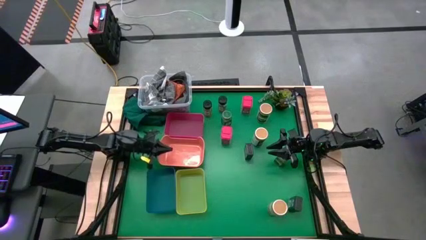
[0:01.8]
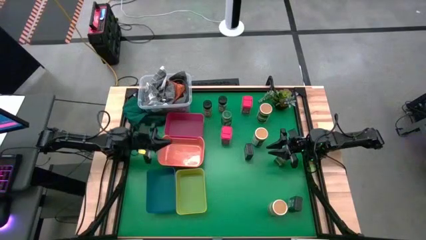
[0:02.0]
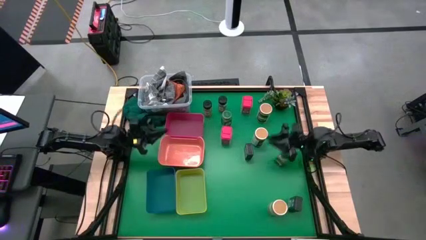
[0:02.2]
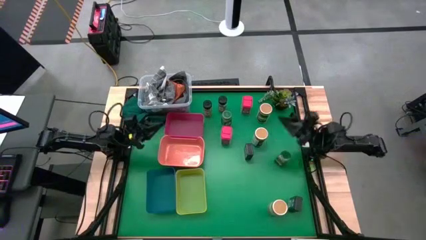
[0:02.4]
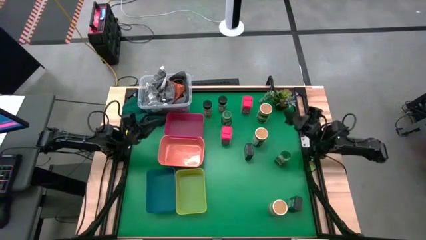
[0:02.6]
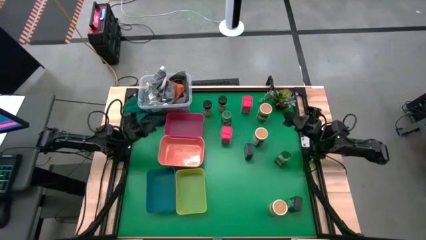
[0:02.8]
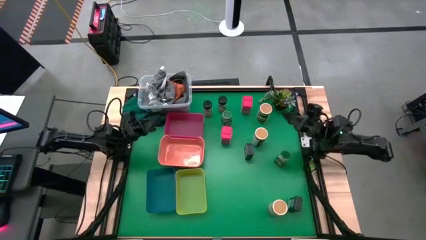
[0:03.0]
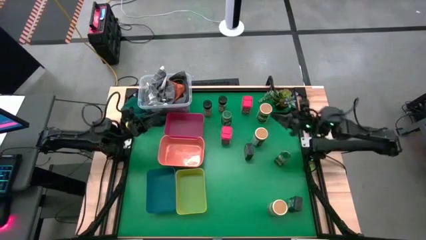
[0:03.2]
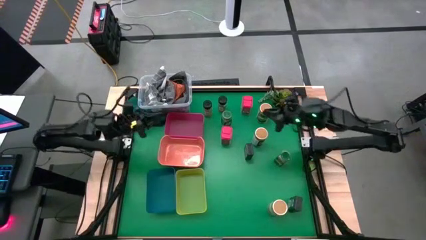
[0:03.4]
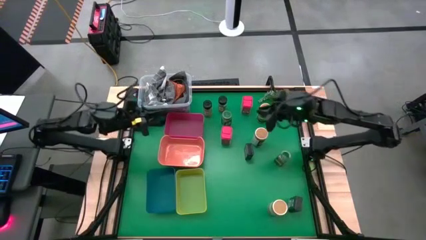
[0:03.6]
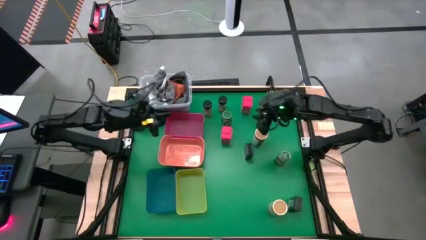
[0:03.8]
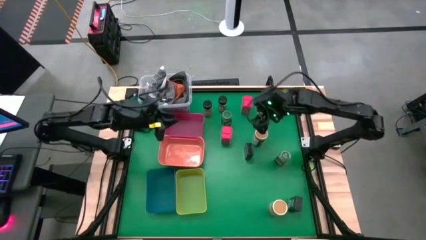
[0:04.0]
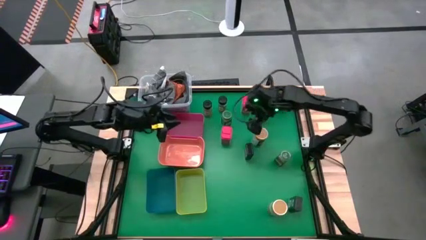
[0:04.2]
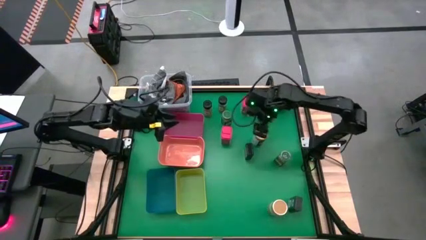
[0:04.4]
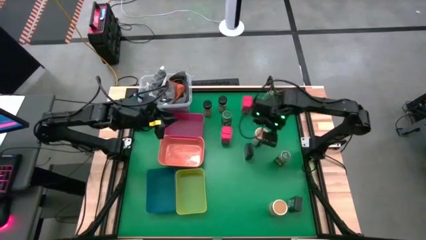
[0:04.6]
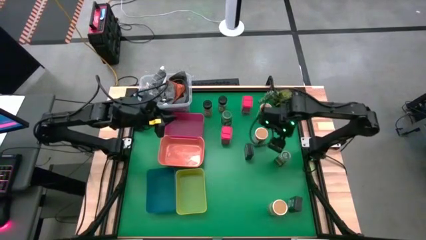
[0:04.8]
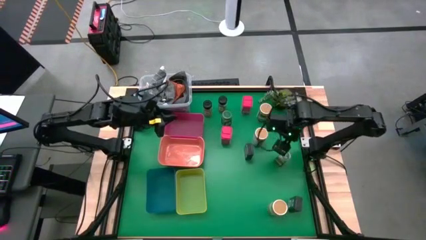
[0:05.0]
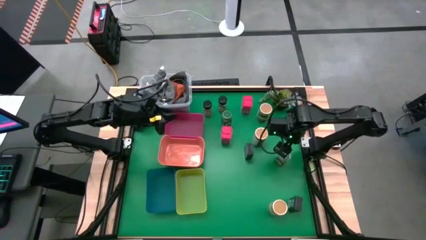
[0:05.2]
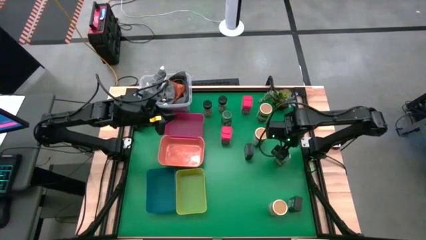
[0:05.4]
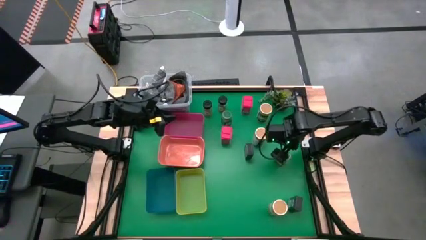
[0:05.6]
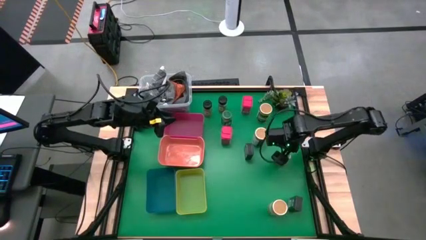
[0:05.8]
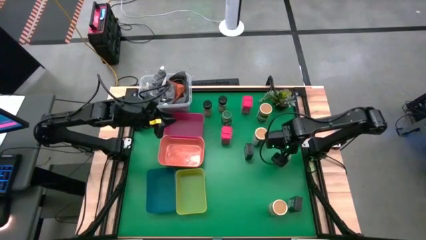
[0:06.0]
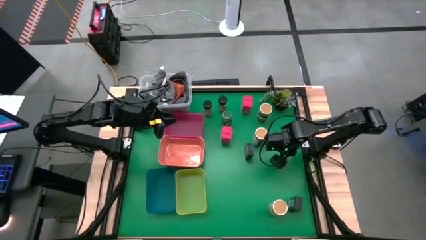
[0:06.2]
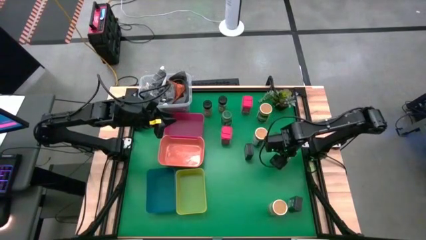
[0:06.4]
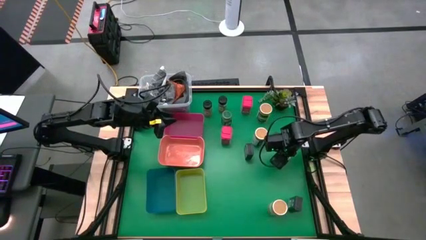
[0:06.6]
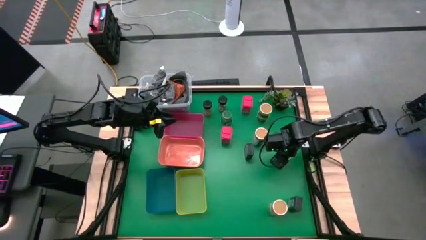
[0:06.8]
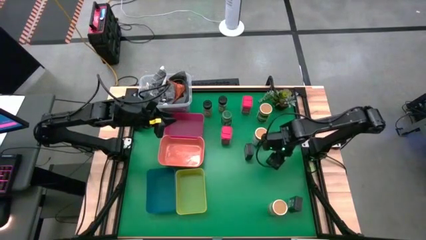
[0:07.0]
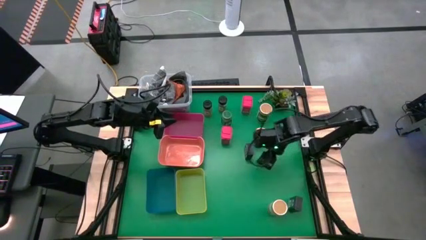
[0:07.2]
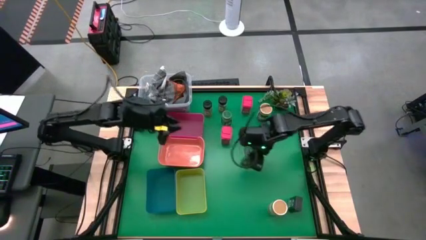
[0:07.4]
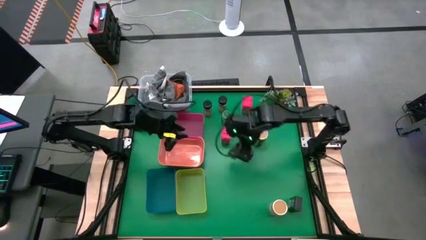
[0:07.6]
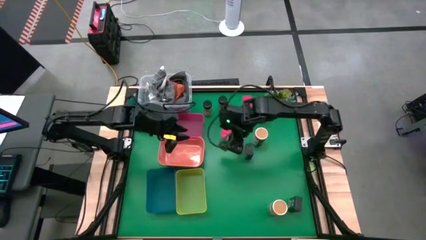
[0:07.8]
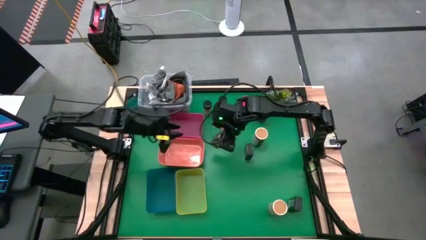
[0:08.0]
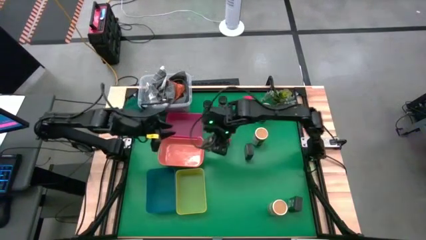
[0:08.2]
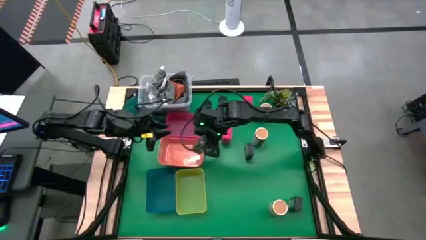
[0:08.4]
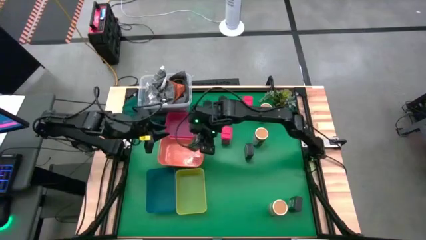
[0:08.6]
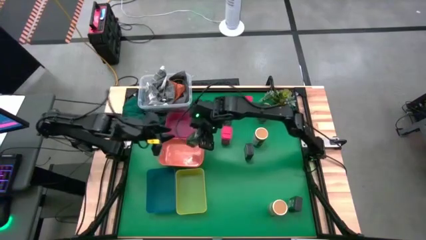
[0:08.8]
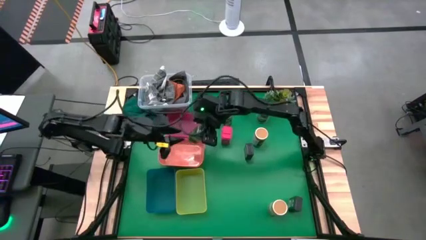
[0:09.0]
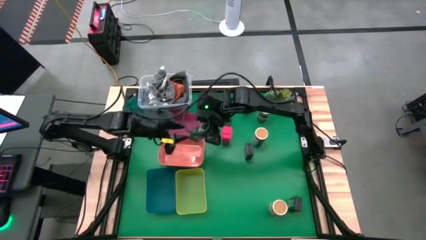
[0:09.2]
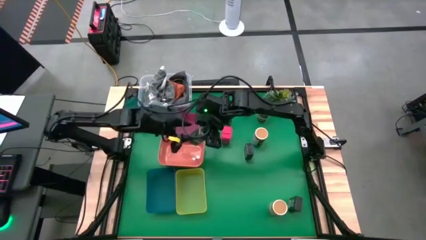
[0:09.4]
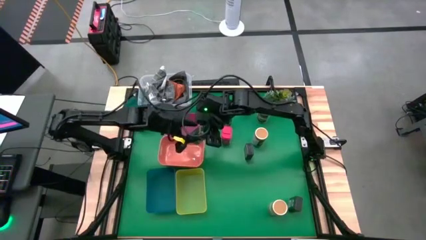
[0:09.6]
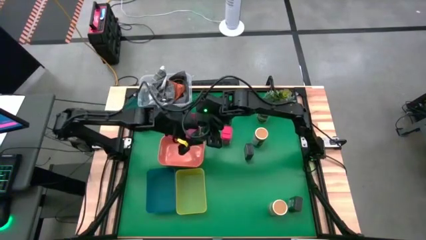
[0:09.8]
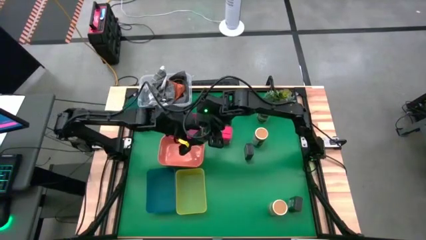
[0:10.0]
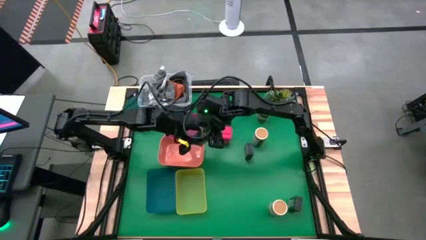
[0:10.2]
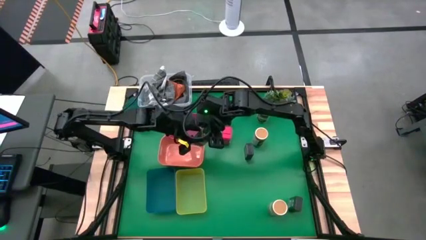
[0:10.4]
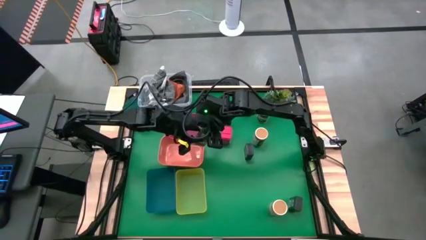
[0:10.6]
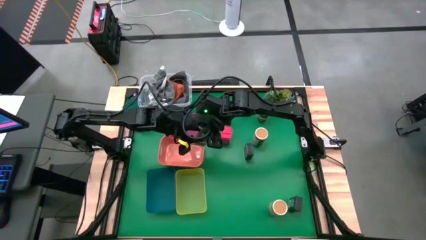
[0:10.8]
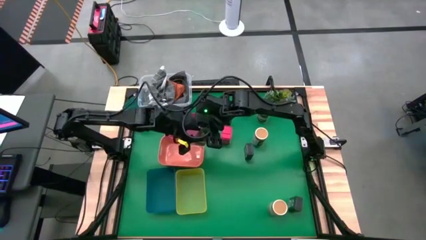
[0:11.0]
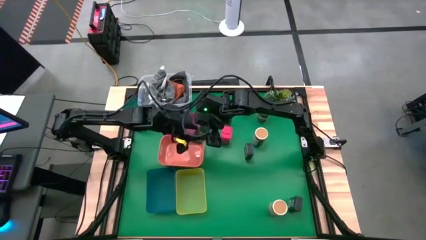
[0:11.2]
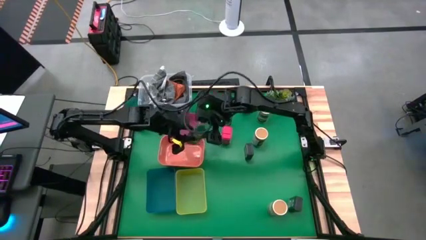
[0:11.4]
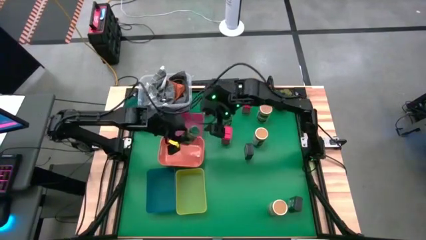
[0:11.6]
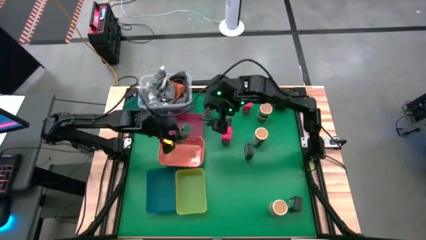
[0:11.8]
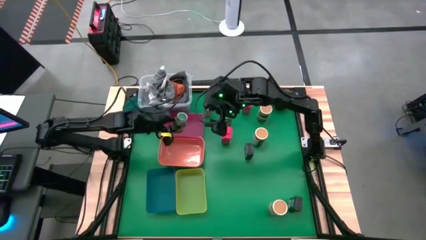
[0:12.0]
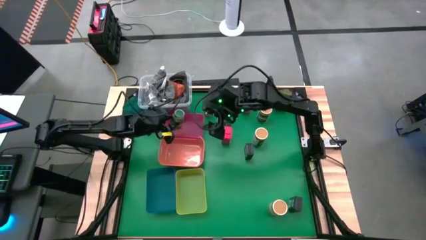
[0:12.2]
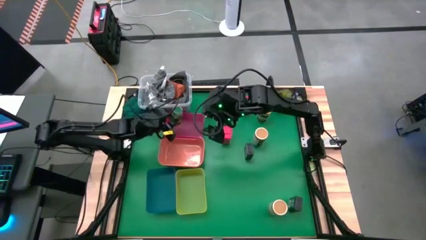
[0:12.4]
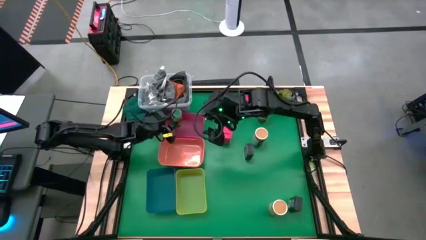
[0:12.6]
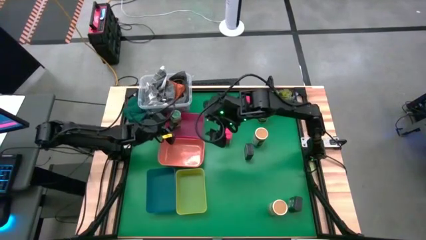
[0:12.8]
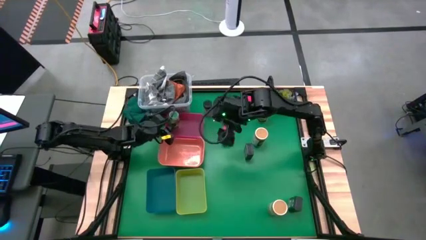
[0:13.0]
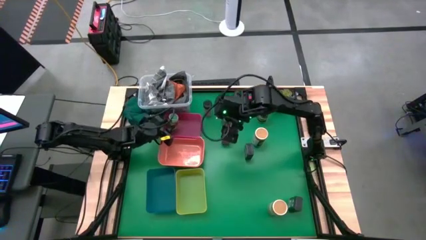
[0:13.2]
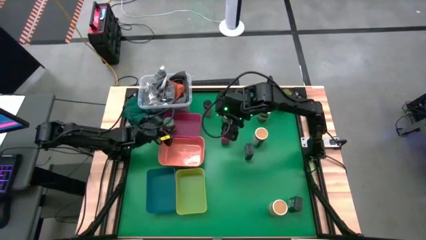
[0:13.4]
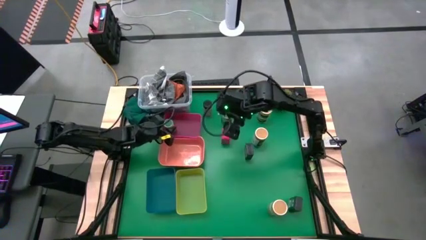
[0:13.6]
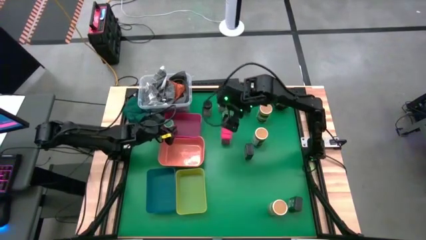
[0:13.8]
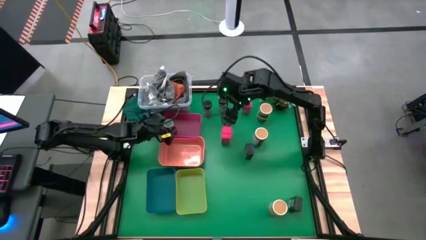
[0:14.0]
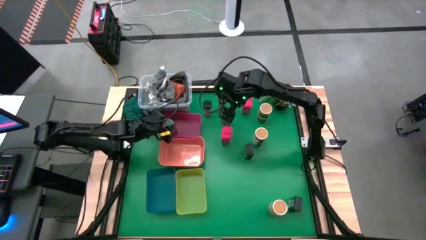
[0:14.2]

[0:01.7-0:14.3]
Task: Sort spices by type
Put the bottom green seasoning bottle into the red bin
